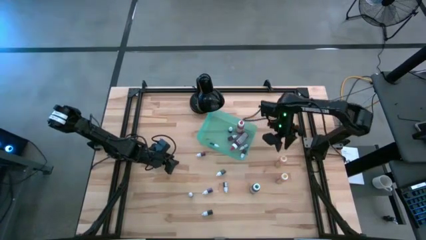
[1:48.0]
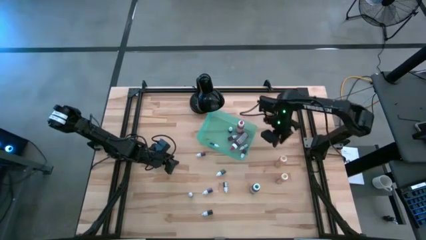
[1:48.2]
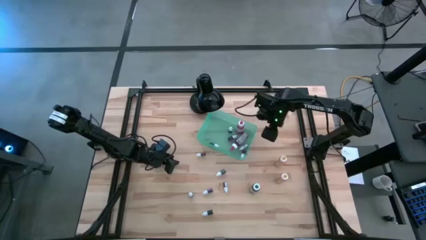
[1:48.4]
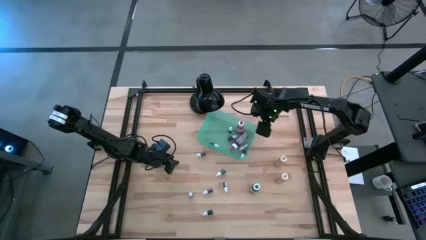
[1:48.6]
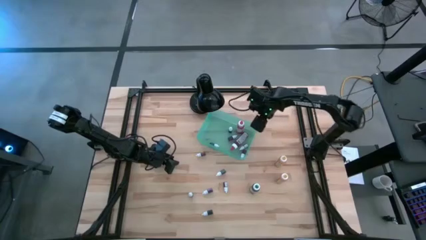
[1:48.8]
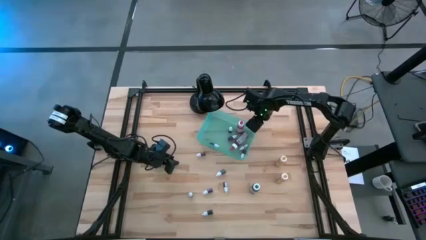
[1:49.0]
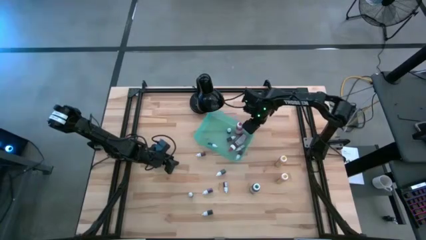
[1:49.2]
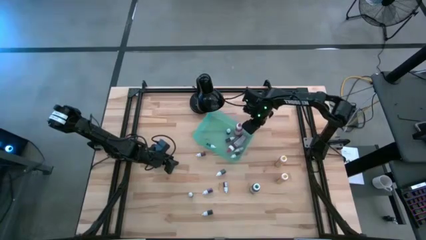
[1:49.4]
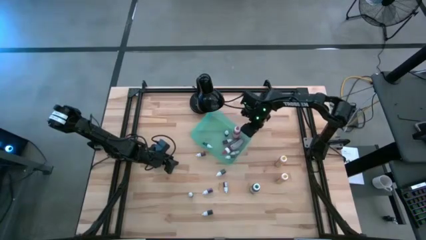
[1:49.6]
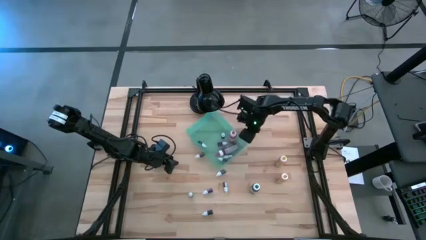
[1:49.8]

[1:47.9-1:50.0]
Task: Pick & Place food coloring
Adjust the green bin on the table

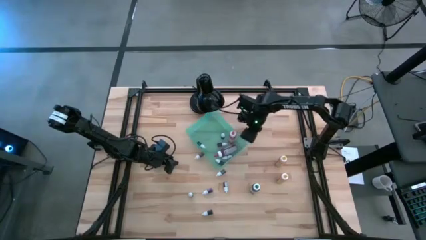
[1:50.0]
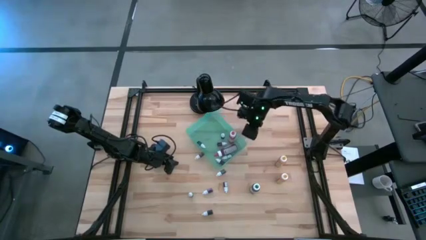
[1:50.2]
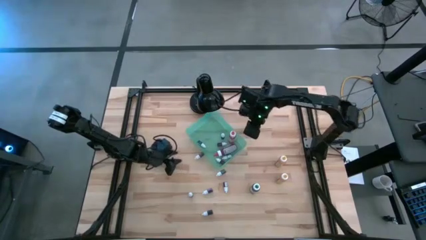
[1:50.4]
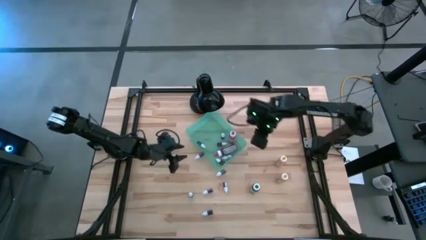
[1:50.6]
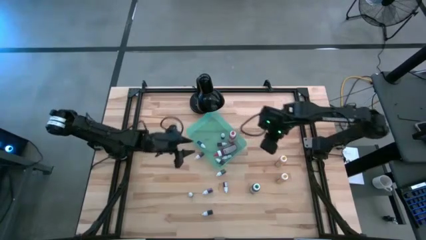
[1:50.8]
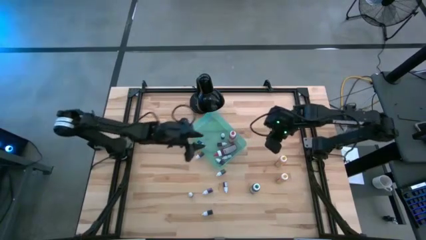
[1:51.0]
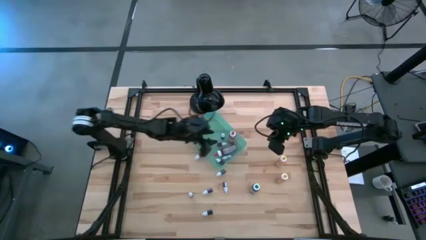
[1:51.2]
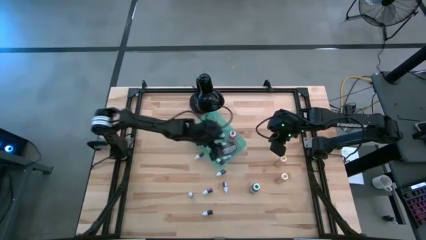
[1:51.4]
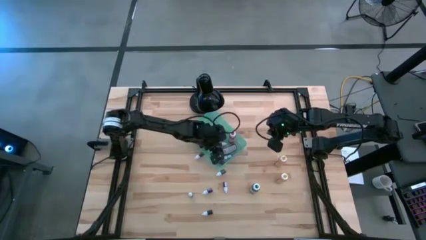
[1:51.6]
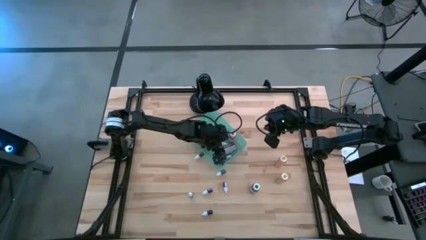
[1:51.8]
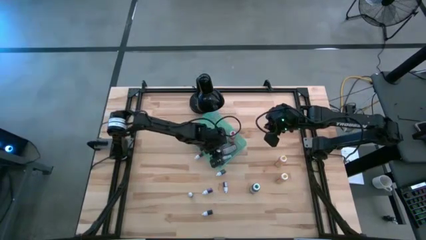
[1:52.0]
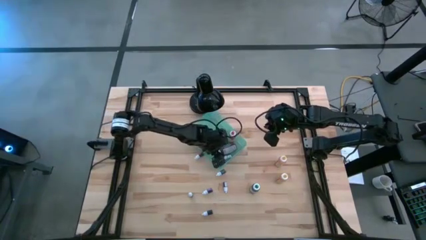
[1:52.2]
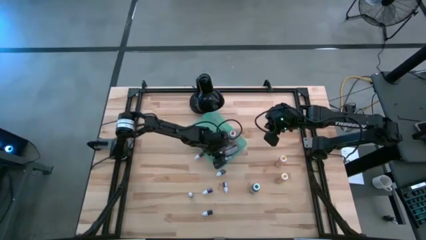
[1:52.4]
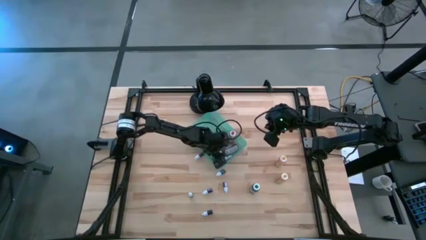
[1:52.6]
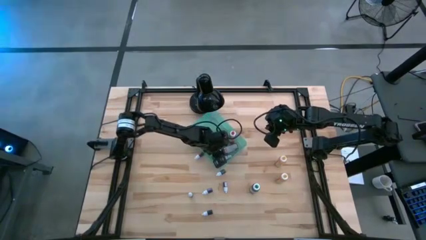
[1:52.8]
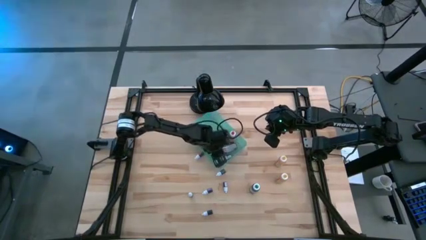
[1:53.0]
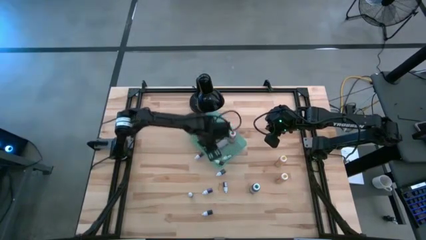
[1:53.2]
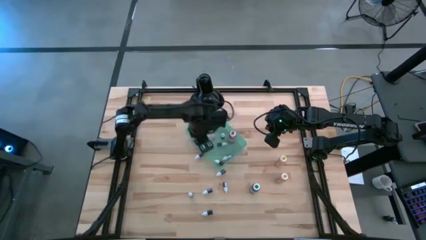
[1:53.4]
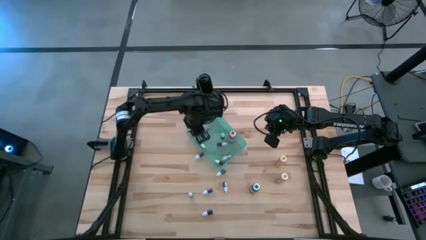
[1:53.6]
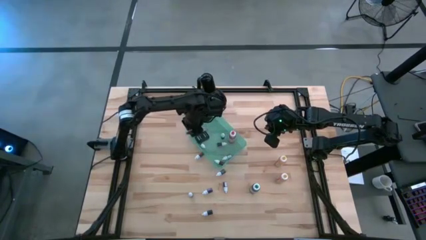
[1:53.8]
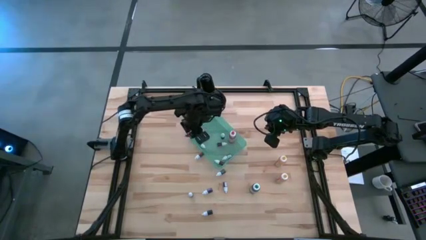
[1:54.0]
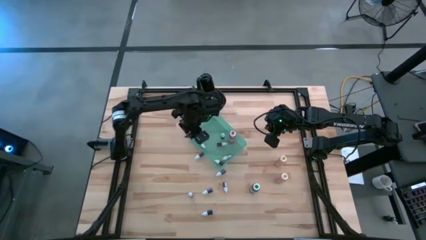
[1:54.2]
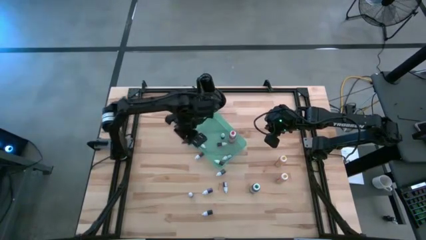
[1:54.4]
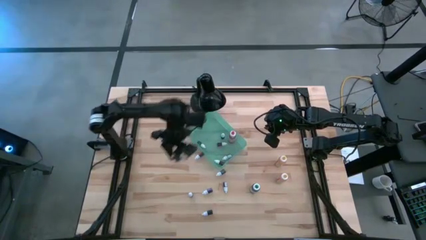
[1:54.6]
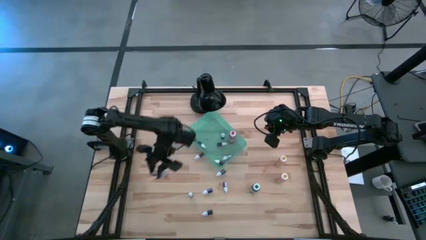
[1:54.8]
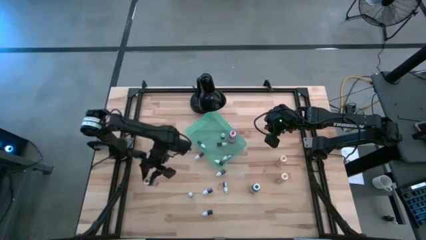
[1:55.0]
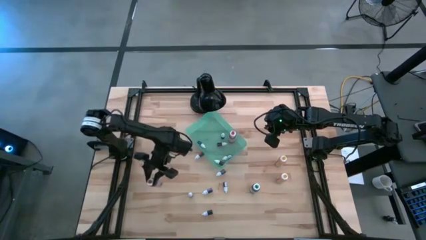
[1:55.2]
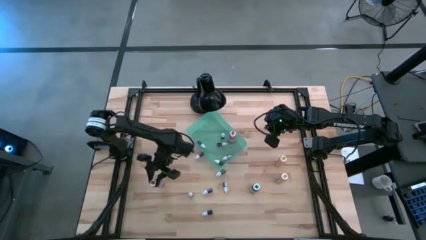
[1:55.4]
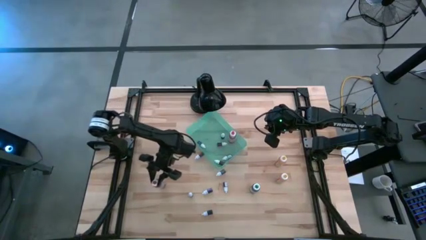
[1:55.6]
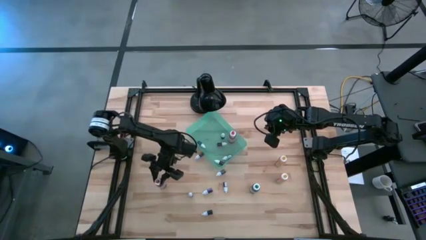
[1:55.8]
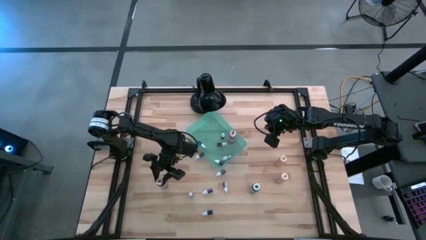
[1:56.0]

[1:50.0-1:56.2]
Remove the large red food coloring bottle from the green bin

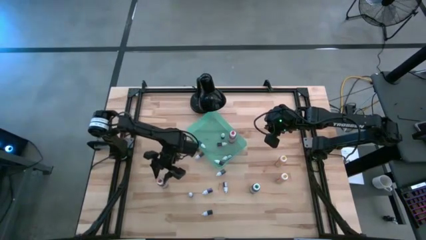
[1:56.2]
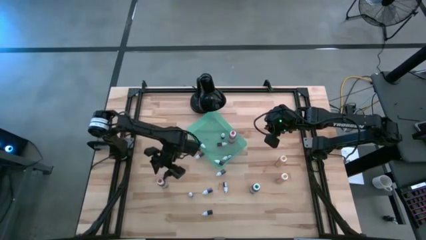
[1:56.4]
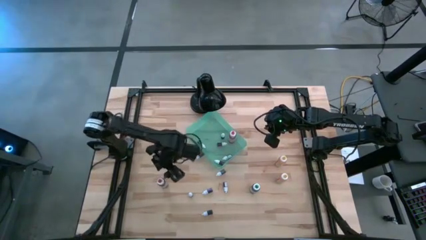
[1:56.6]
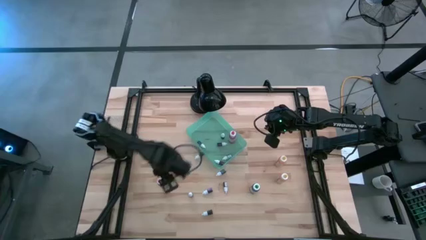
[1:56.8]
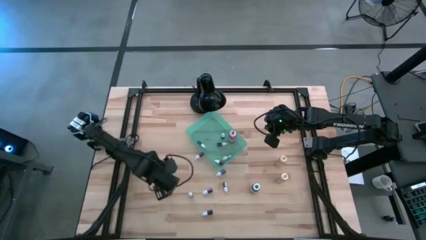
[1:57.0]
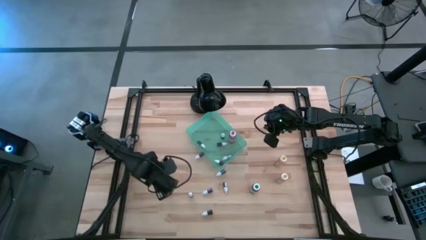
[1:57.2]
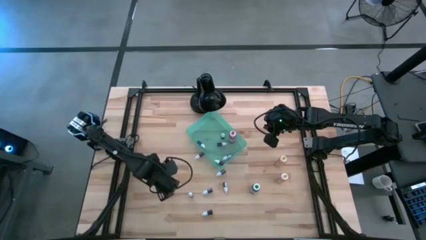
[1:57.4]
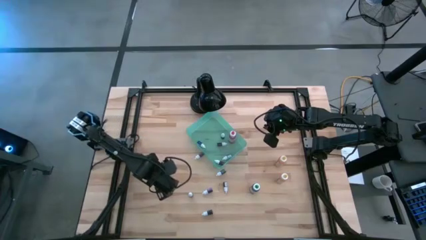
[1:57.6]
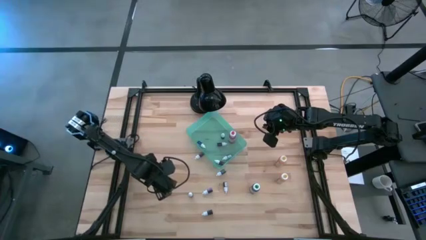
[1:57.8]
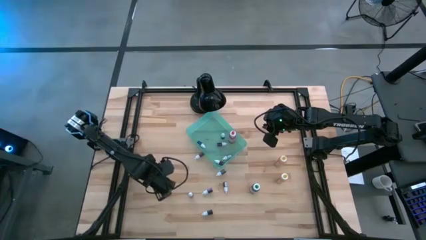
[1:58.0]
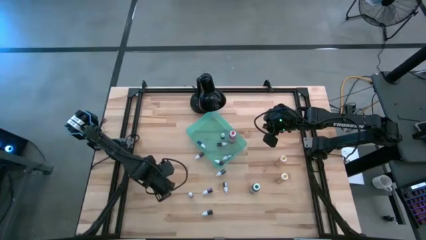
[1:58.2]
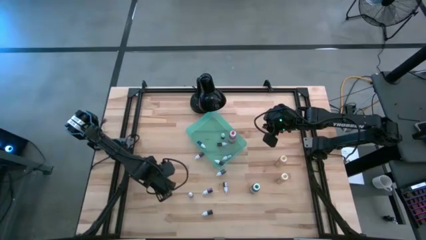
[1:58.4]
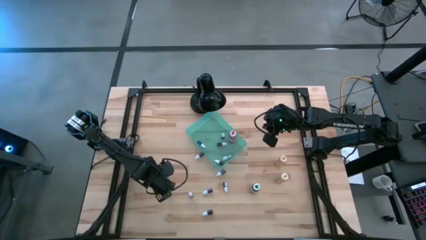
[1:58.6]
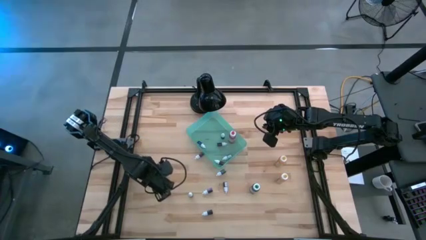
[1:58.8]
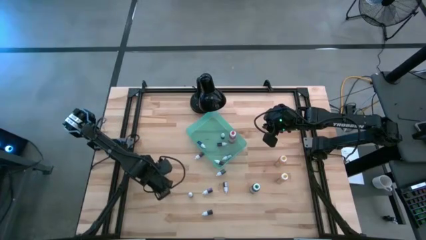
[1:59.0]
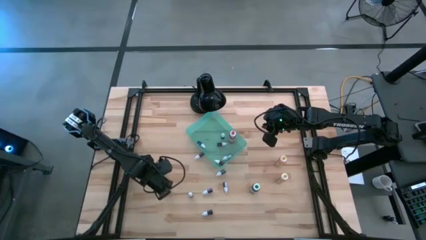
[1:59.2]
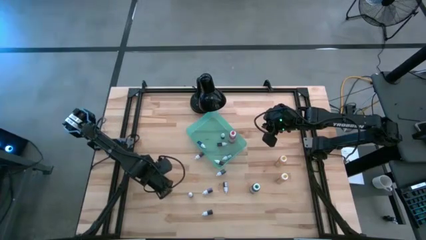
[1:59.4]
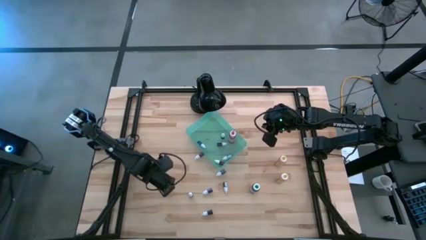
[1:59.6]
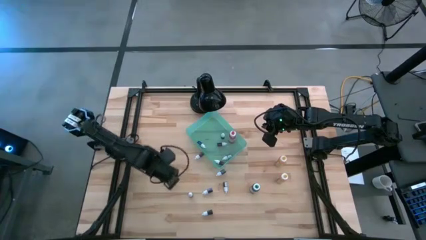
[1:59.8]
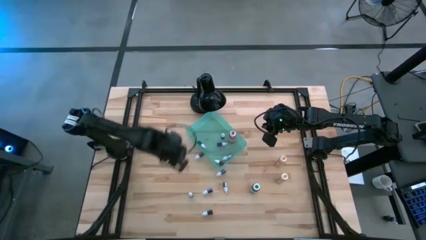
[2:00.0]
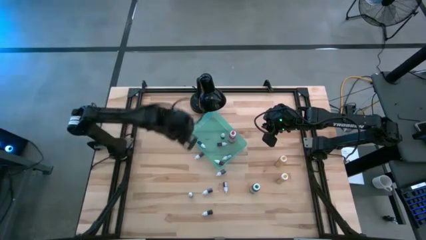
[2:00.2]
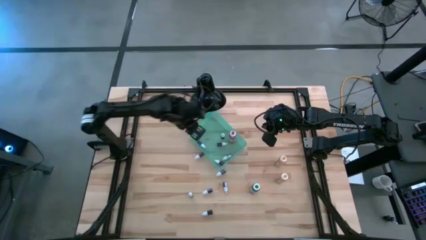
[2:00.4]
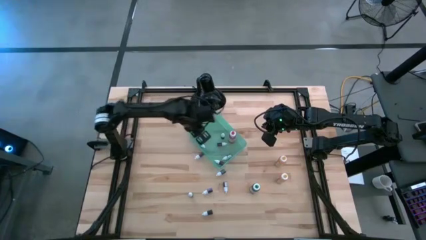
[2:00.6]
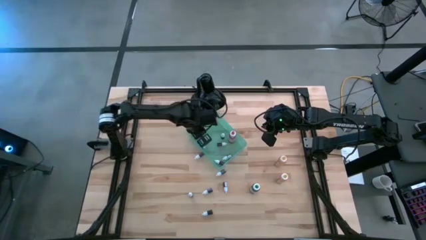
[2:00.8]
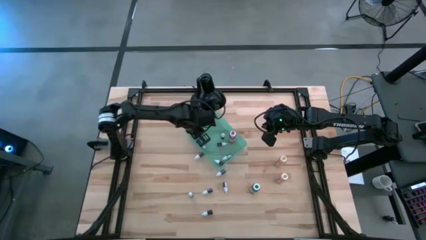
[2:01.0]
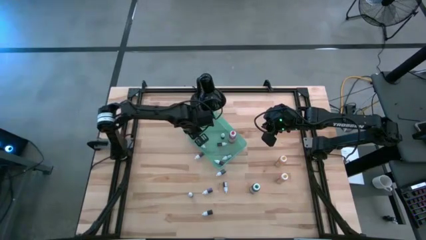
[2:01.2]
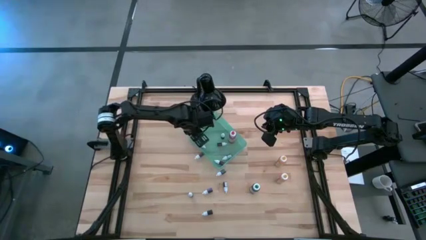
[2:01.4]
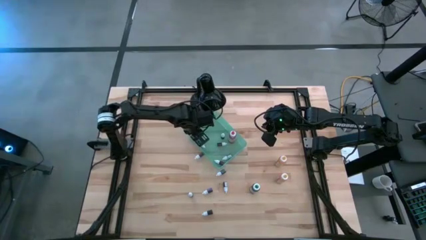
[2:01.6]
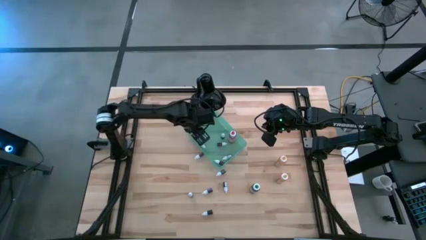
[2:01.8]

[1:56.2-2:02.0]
Put the large red coloring bottle into the green bin

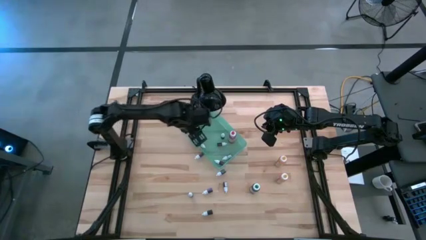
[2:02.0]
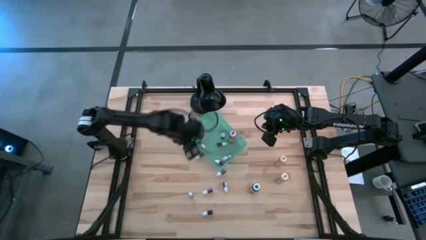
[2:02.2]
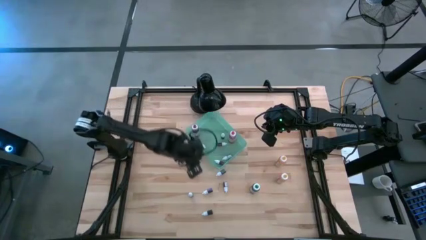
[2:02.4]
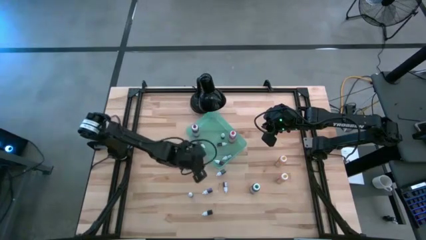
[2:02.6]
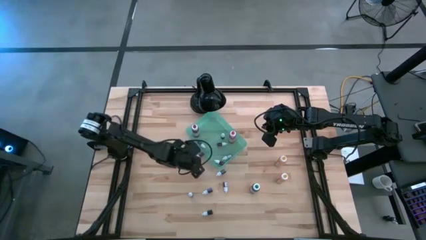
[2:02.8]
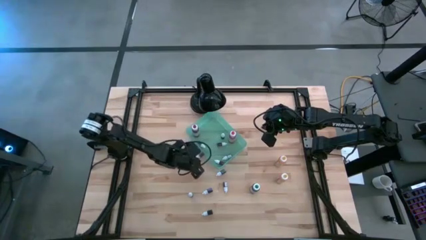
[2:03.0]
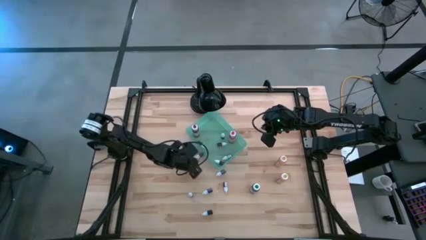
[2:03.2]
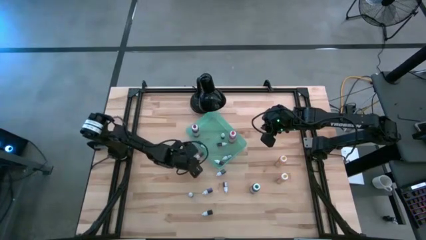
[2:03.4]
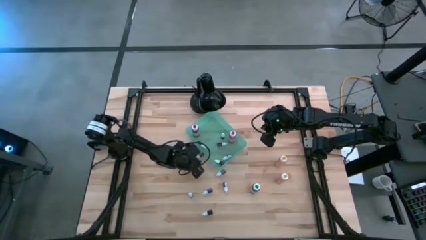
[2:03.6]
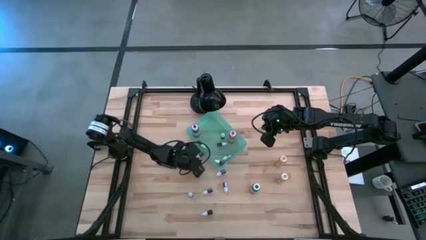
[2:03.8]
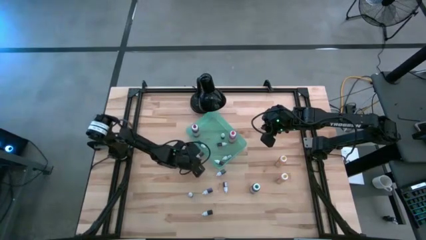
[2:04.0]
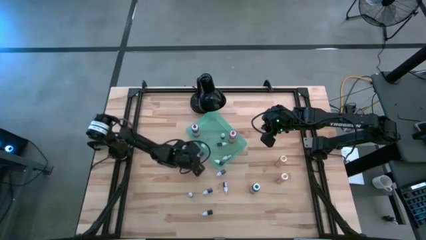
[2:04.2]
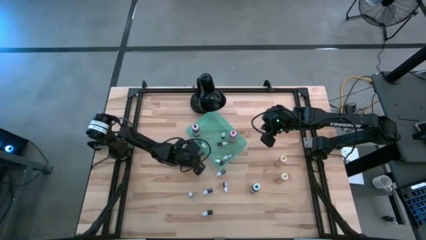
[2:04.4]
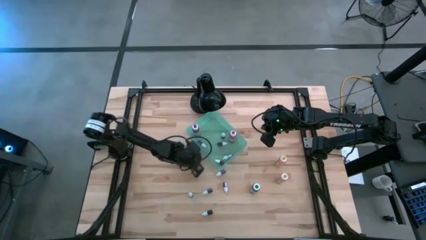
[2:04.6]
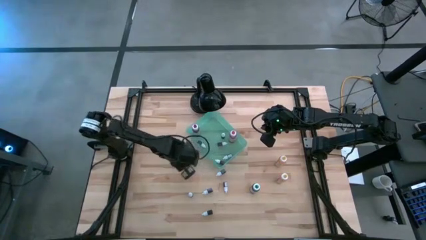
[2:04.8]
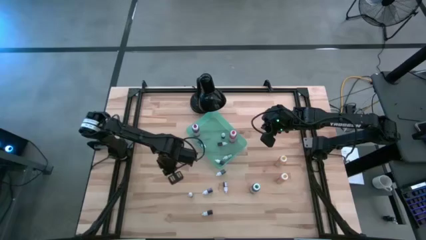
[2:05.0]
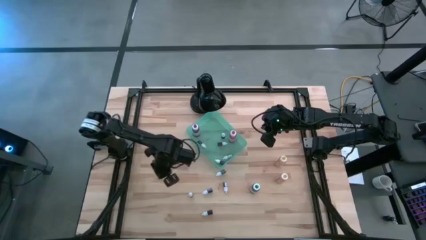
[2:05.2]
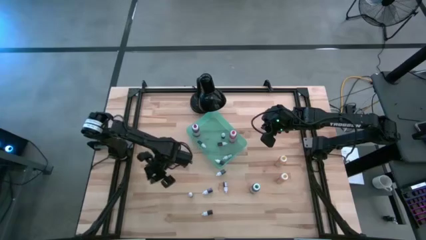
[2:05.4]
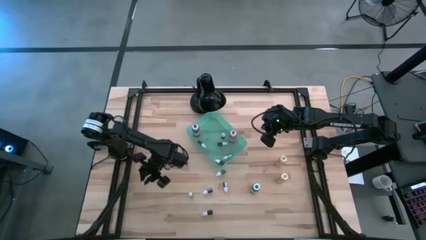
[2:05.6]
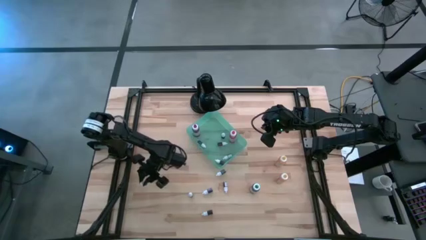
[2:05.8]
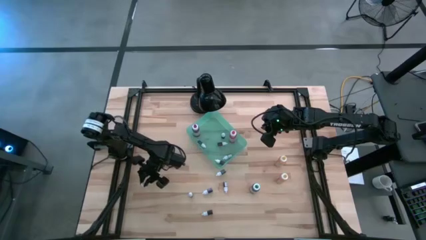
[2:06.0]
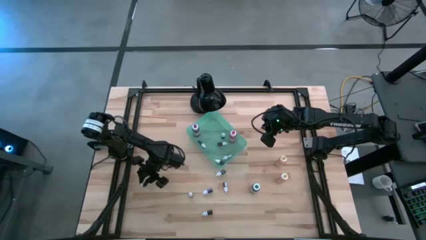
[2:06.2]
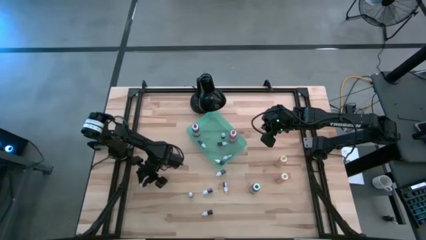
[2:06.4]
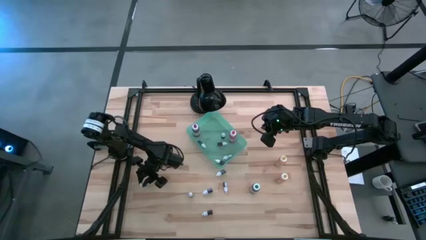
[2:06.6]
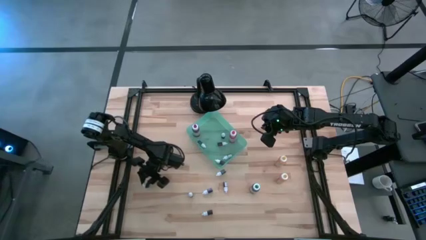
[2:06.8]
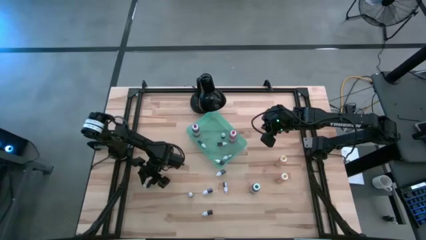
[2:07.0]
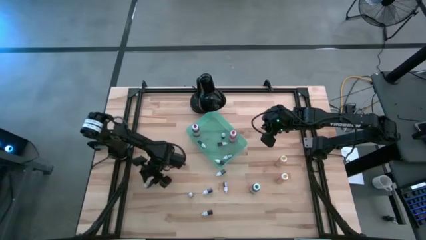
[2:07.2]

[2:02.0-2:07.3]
Adjust the small red food coloring bottle
